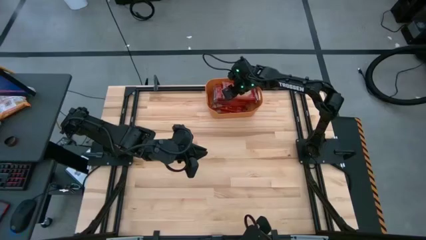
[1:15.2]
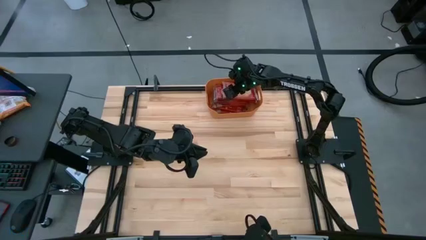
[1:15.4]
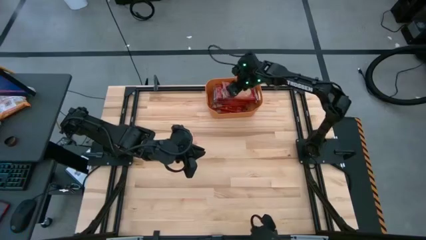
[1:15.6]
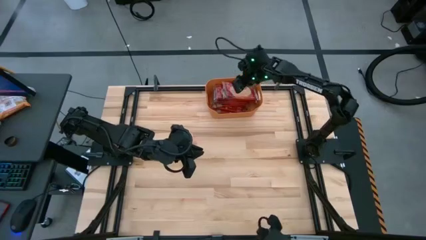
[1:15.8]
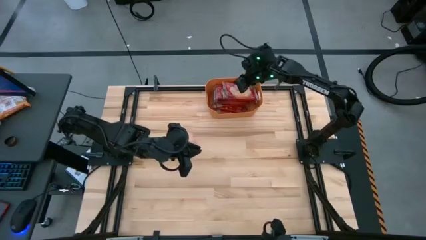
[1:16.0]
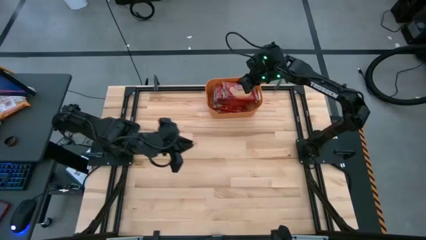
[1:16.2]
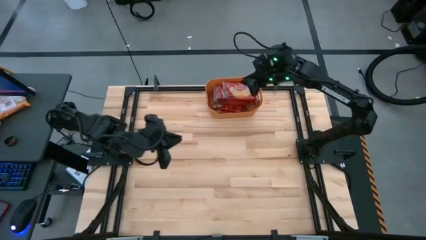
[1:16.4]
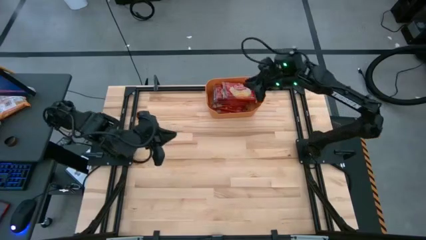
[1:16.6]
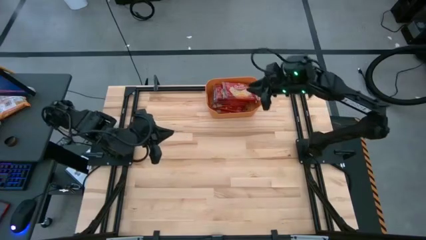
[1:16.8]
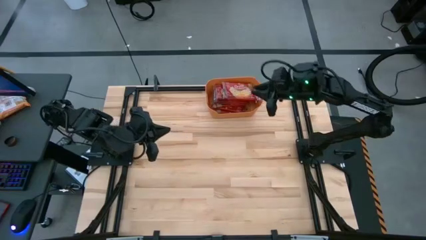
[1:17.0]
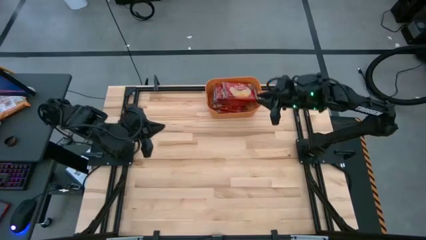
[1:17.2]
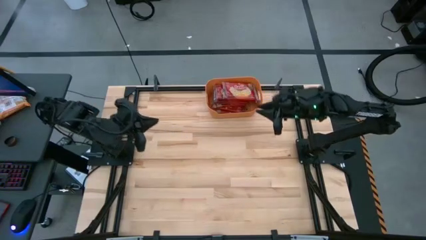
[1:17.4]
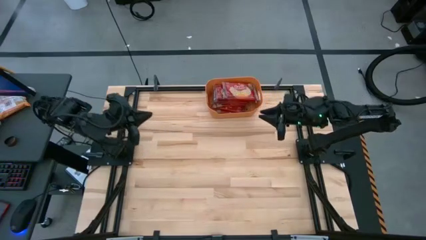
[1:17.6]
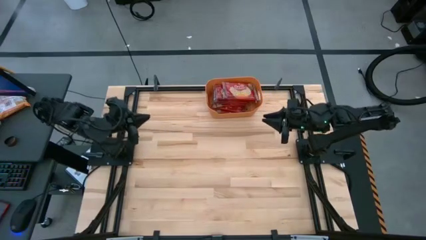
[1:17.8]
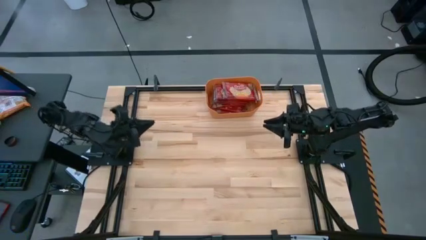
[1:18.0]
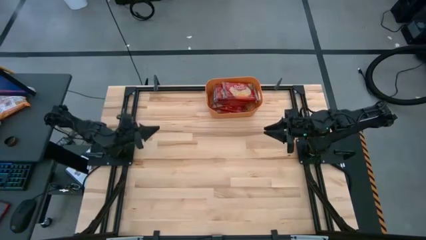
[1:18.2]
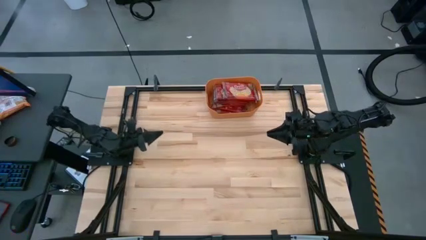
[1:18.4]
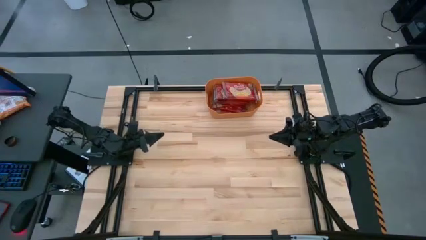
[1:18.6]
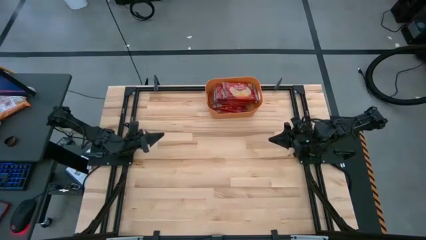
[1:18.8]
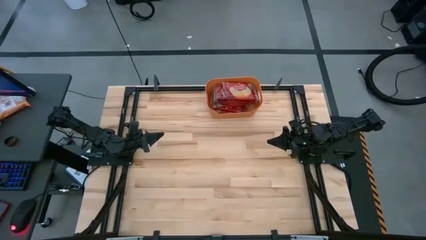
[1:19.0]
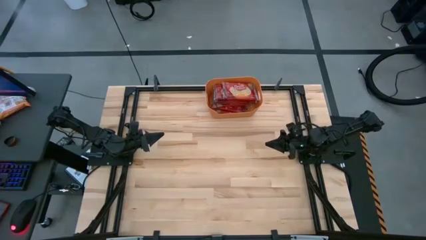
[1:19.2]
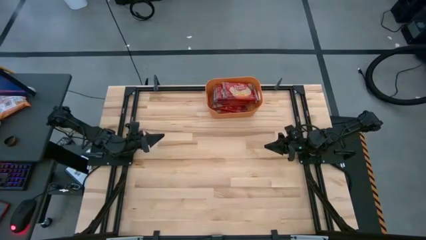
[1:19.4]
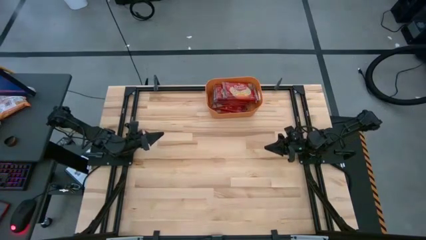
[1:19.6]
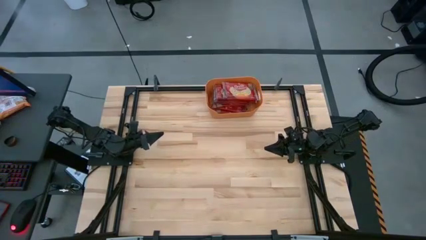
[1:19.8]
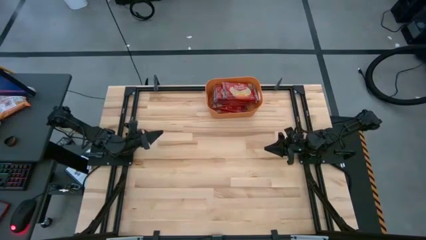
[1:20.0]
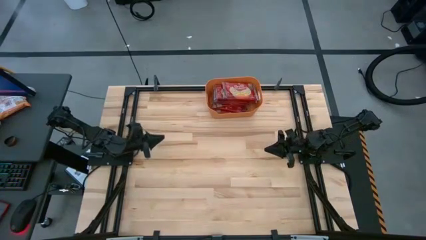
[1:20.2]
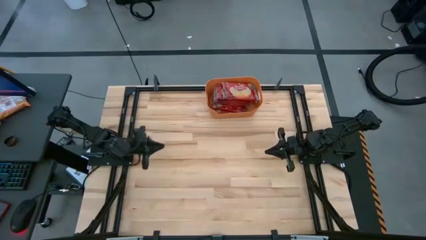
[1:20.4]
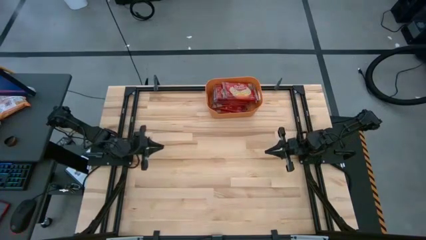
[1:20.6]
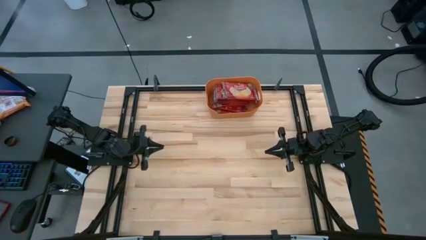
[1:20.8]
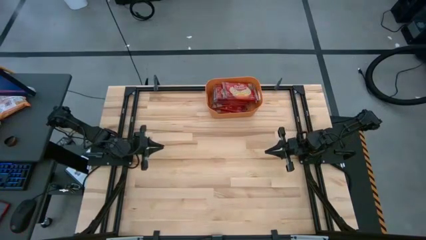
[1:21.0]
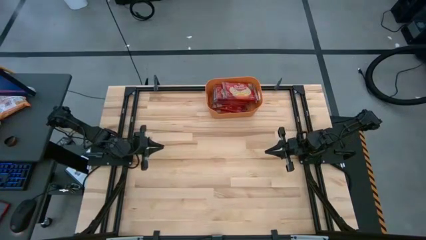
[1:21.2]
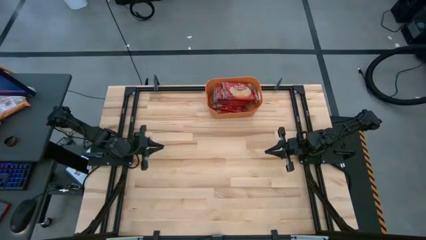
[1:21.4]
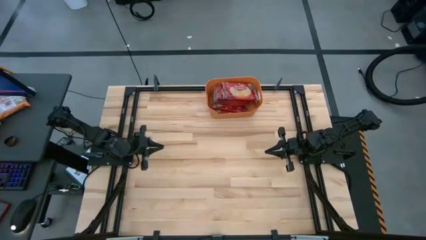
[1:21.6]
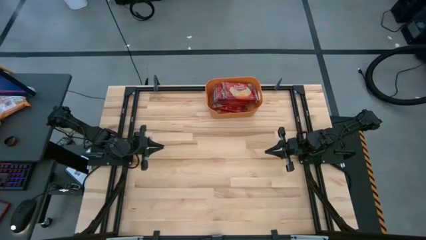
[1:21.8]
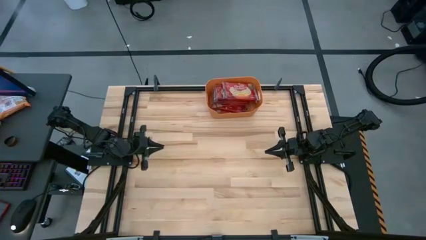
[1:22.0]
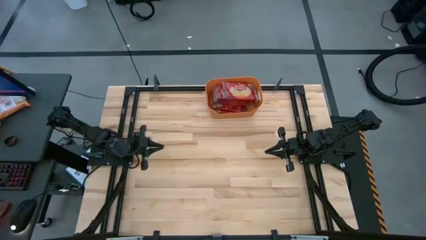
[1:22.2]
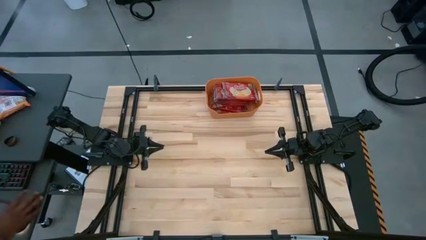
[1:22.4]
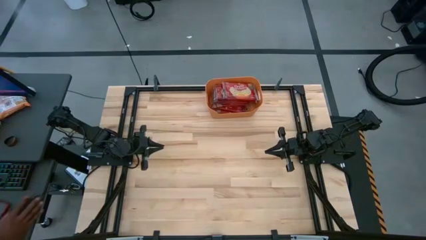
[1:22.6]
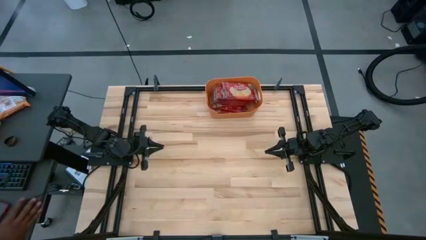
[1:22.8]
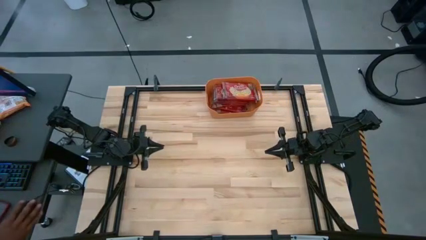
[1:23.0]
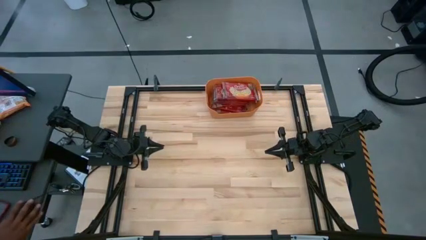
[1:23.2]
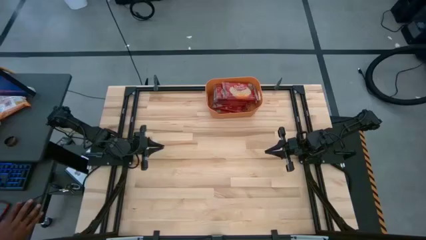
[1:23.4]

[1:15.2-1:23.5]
Task: Sort popcorn bags into baskets
Return to Home Position

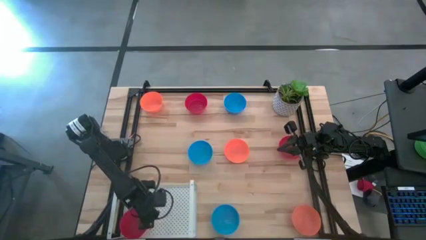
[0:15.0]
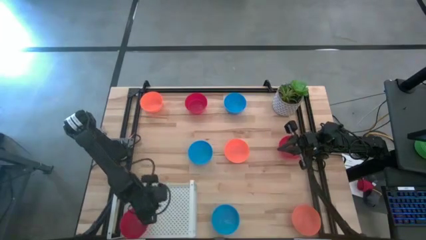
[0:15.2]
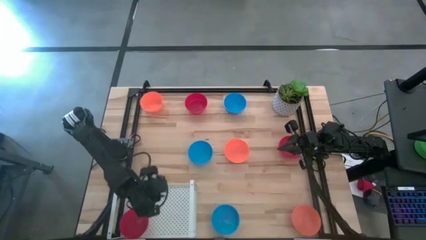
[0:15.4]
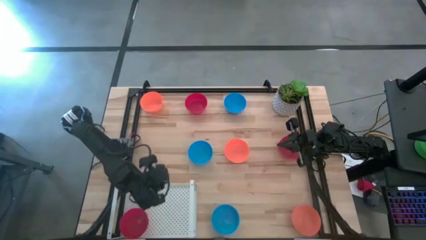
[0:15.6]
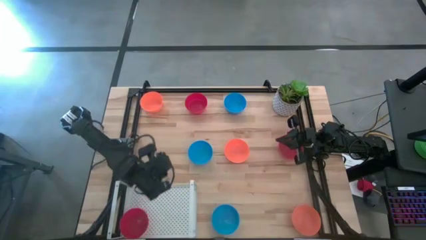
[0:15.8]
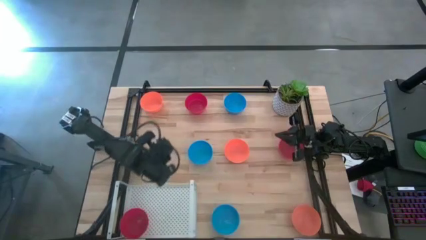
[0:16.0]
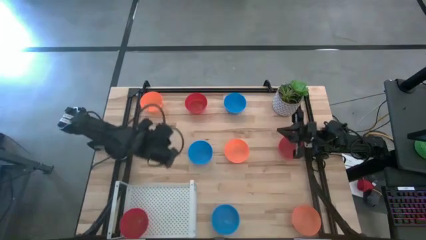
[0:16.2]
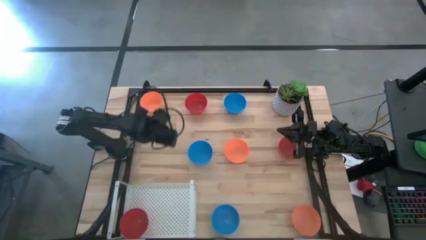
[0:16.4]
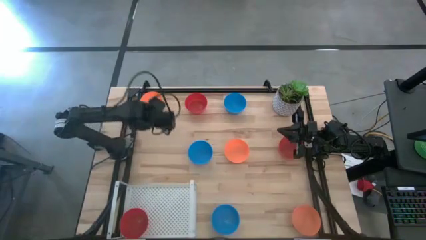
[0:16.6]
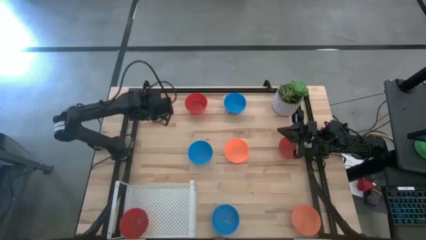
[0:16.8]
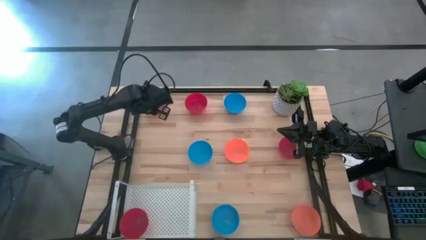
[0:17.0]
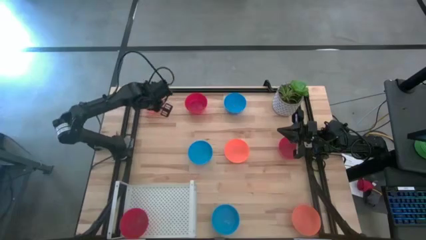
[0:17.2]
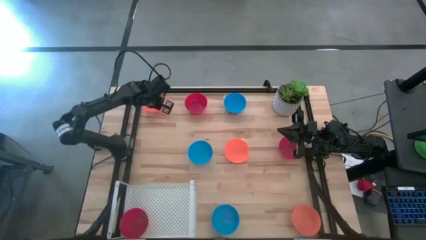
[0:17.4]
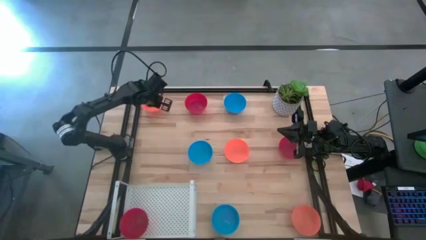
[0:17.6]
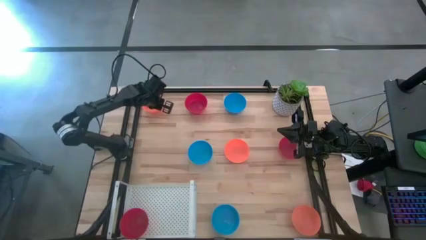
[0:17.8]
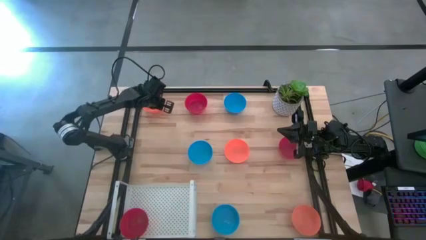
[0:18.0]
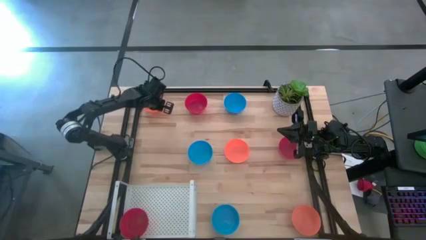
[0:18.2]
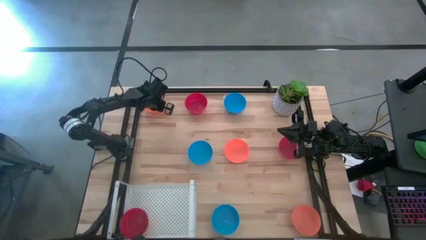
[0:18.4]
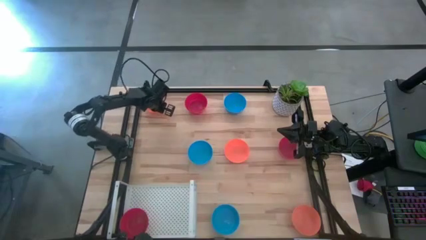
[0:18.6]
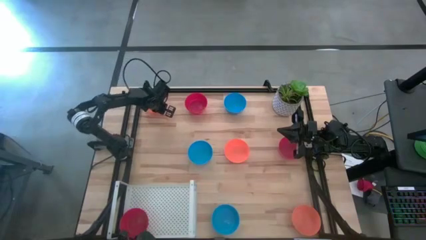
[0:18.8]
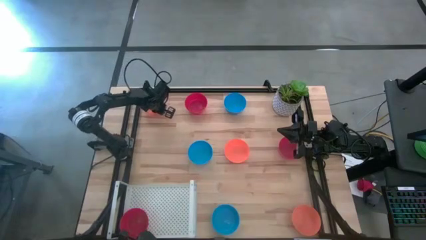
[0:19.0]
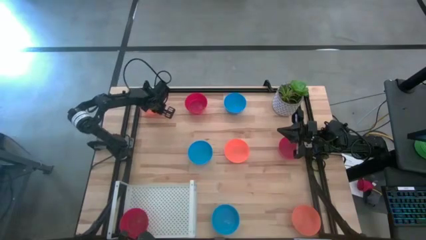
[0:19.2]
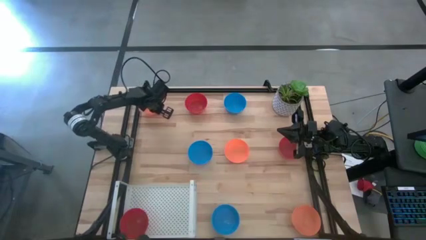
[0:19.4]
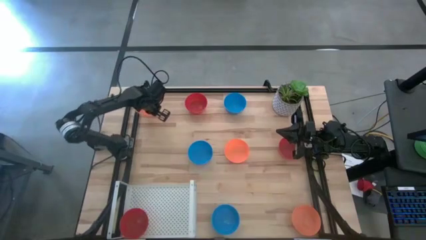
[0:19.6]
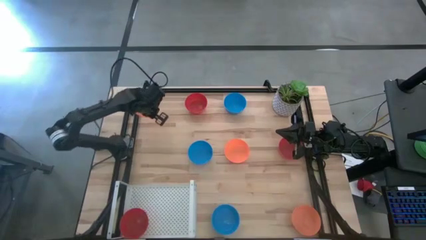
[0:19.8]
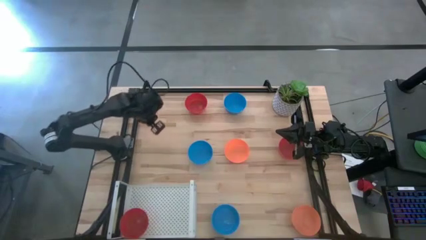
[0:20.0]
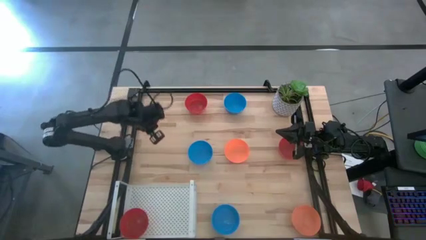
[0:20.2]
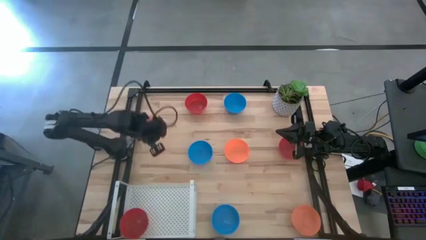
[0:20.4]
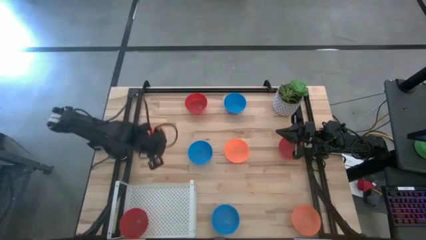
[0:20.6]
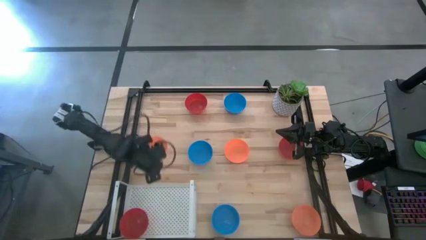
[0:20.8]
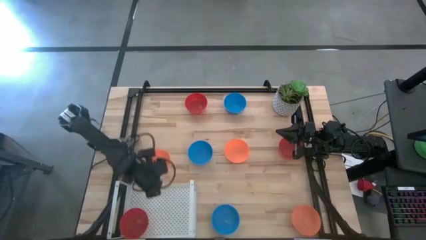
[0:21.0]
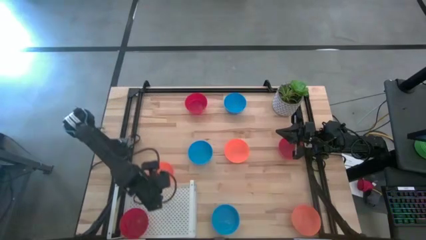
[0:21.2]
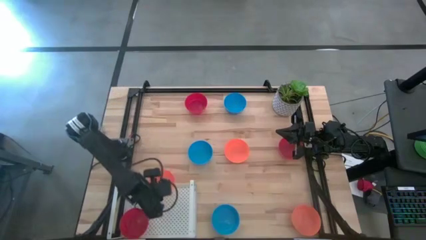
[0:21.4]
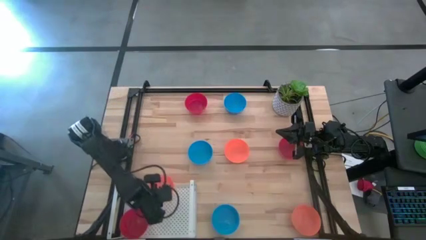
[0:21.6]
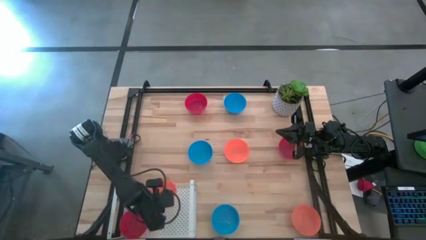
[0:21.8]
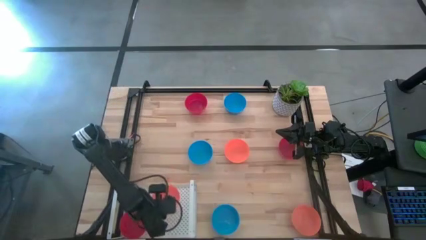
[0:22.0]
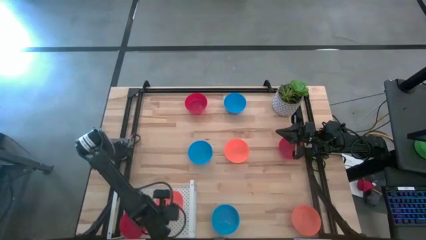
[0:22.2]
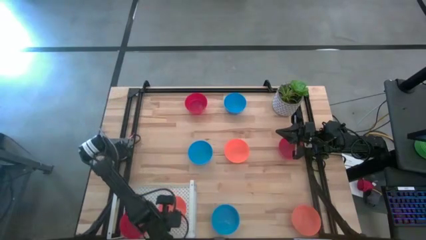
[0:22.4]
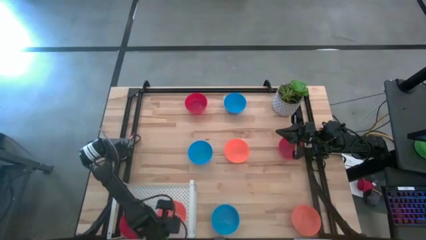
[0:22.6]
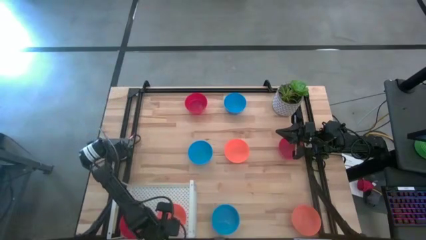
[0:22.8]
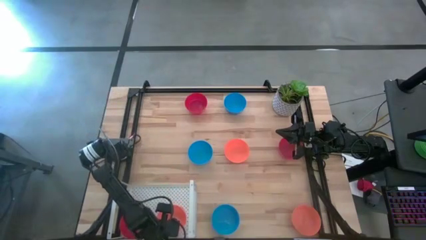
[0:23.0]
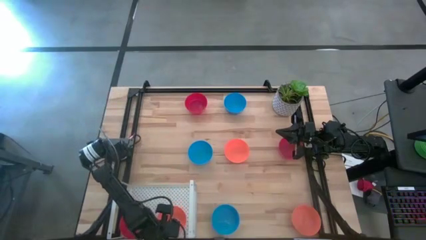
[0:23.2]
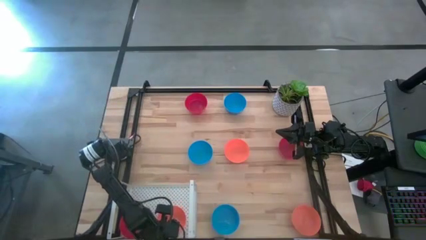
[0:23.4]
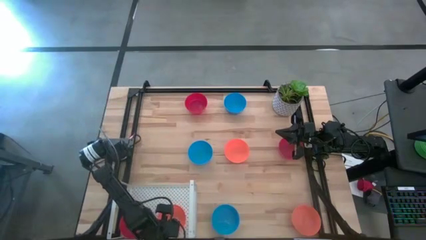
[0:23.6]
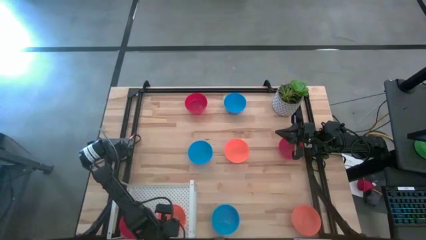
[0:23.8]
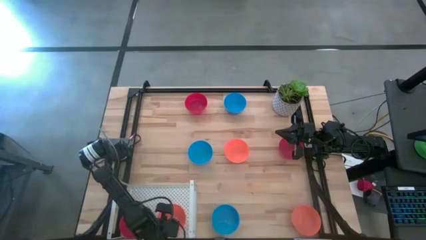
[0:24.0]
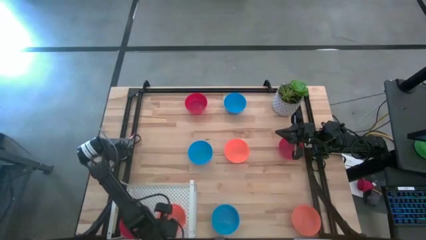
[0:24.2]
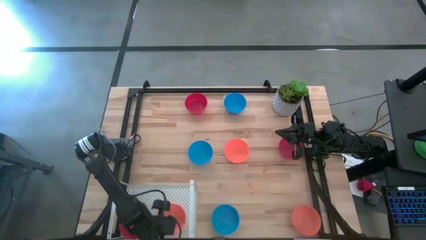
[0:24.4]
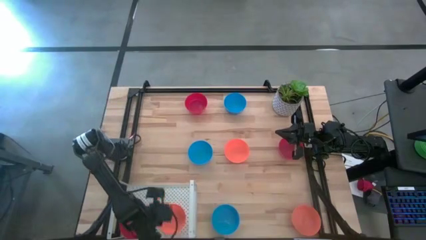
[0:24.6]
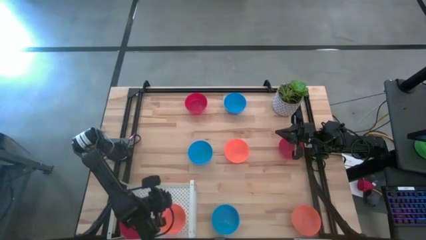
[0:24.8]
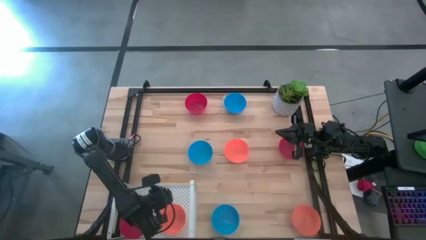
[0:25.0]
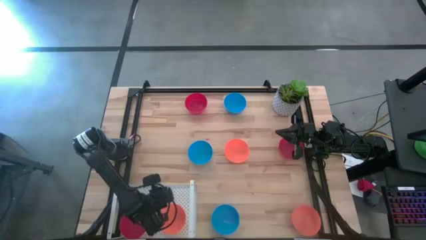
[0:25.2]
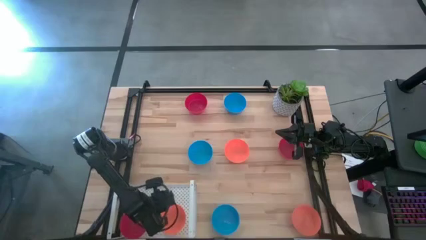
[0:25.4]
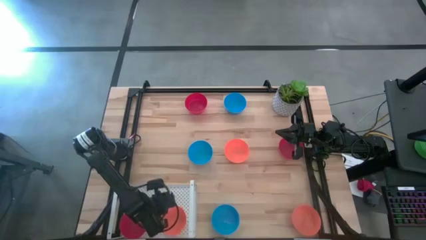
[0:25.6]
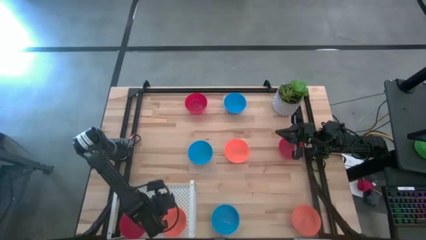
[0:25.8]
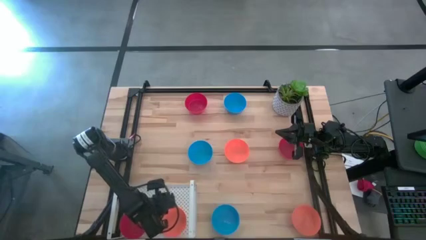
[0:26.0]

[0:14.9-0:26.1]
Task: Pick & Place Mini bowls
Put the top orange bowl on the shelf
